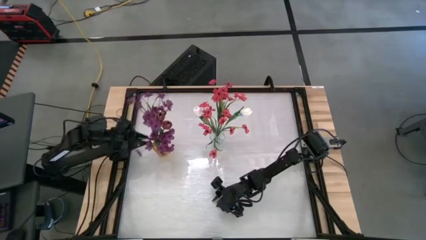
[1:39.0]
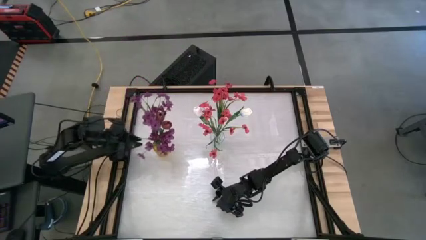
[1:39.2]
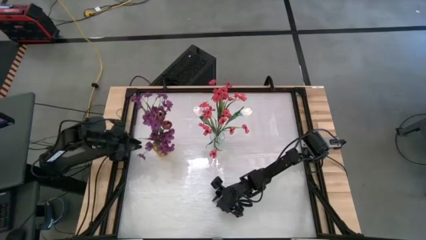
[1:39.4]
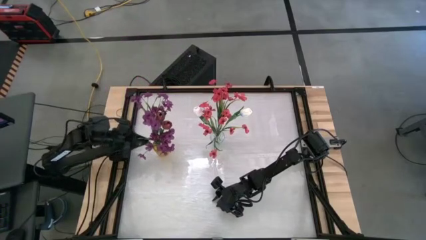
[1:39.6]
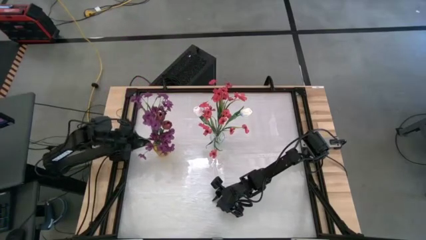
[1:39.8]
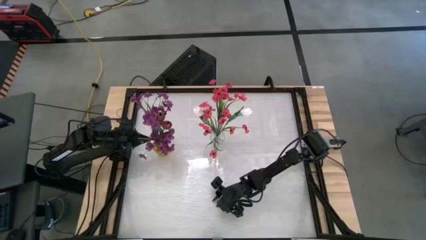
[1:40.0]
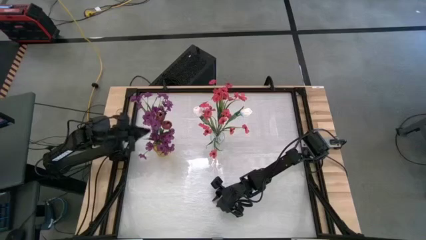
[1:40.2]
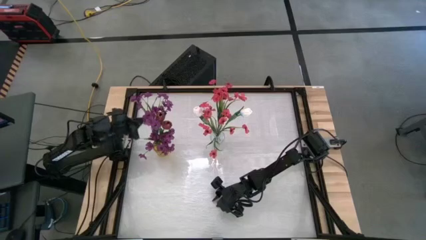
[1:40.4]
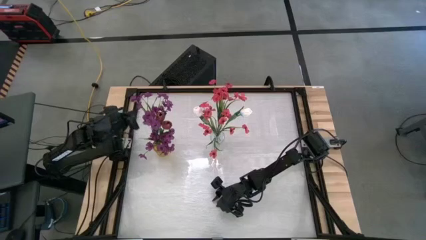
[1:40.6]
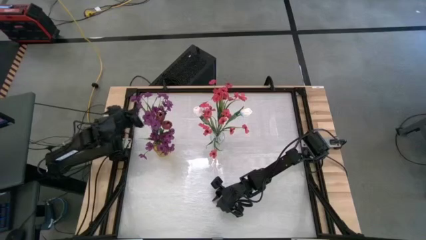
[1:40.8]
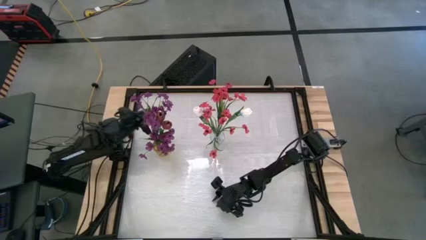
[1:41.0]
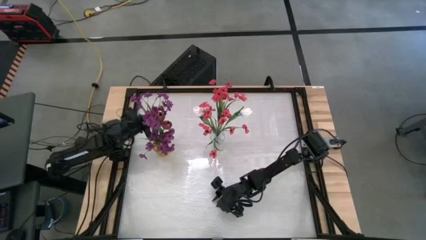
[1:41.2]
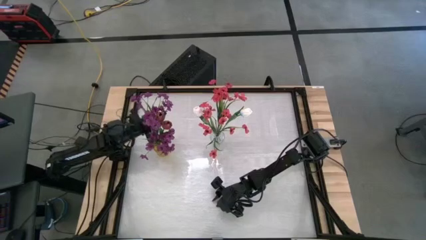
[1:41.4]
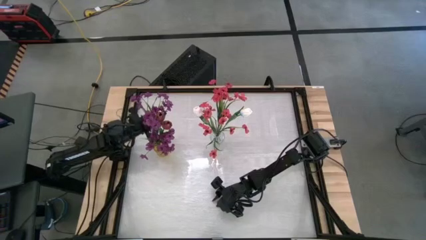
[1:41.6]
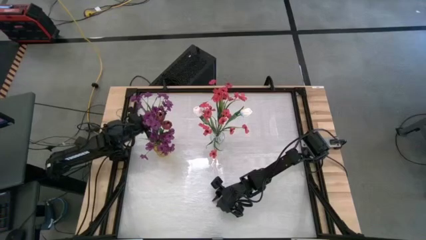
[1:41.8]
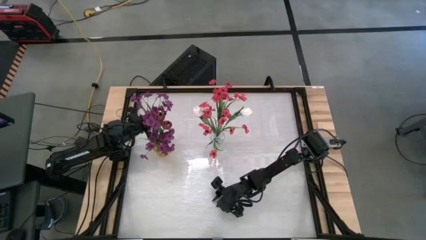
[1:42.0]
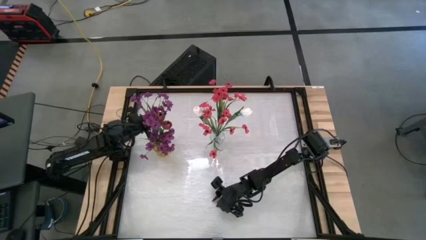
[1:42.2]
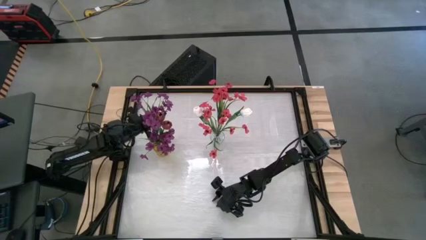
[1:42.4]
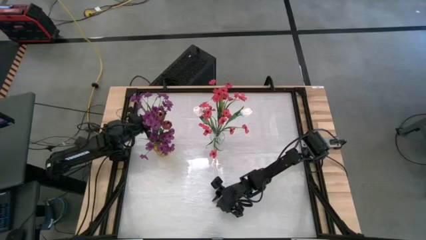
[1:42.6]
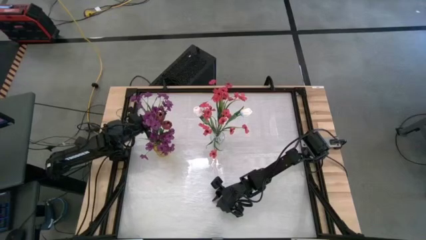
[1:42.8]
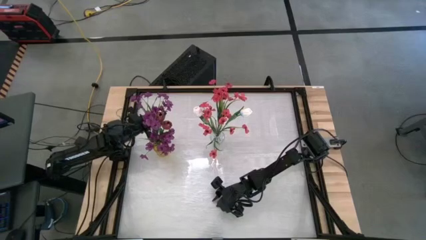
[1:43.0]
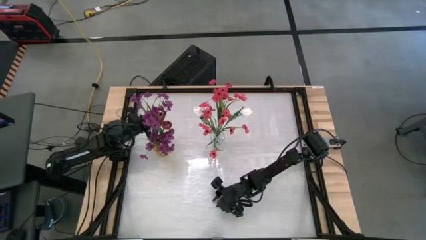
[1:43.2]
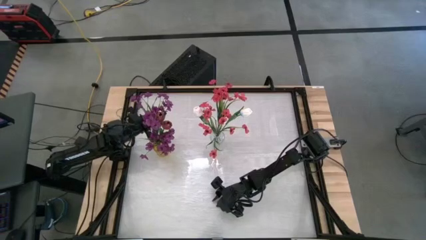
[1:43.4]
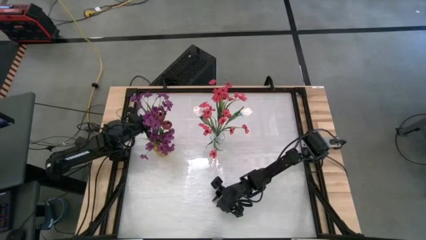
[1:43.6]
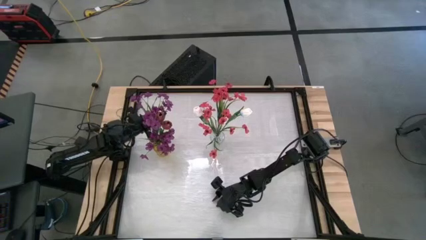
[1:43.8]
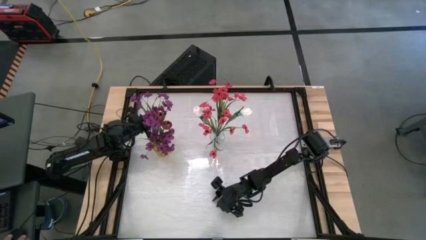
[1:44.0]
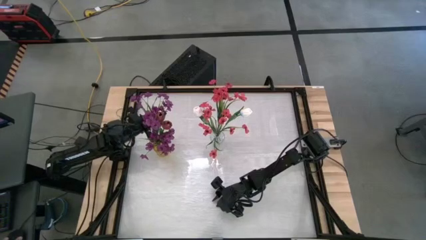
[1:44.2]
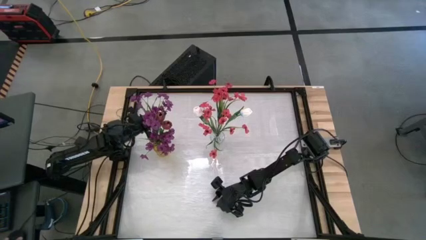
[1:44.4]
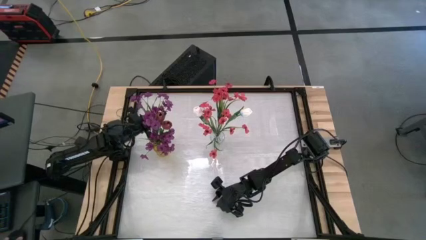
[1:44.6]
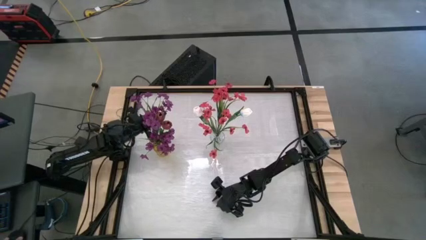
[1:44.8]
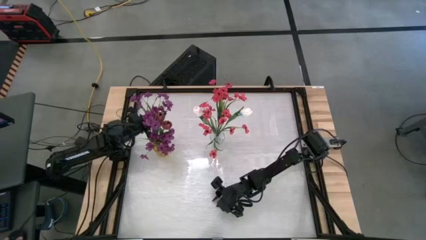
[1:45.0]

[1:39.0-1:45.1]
Task: Sort flowers into vase by color
Return to Home Position

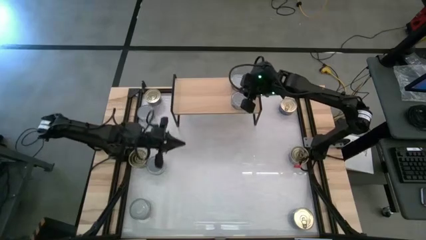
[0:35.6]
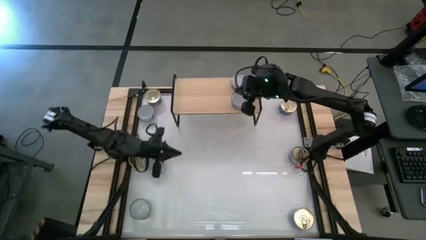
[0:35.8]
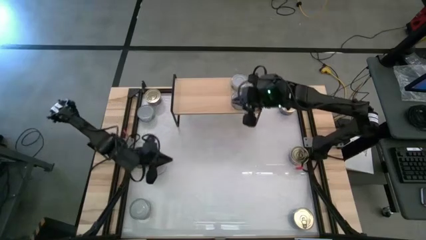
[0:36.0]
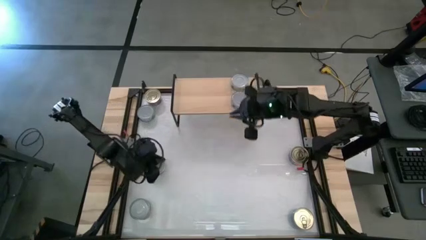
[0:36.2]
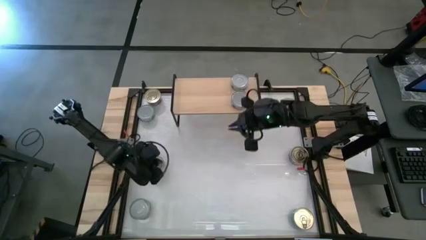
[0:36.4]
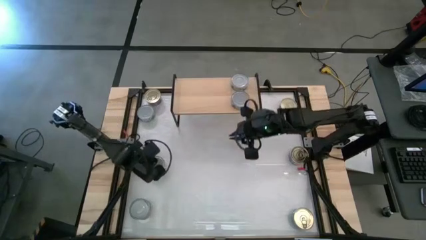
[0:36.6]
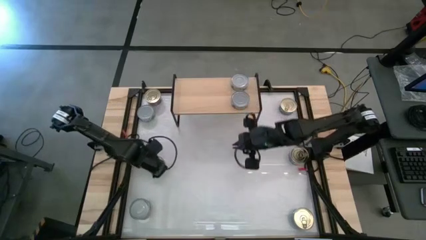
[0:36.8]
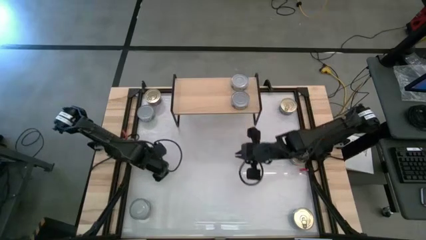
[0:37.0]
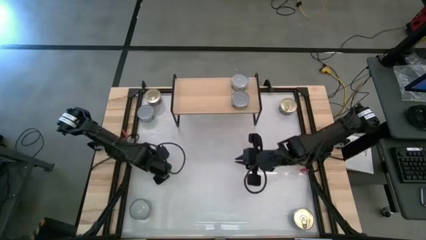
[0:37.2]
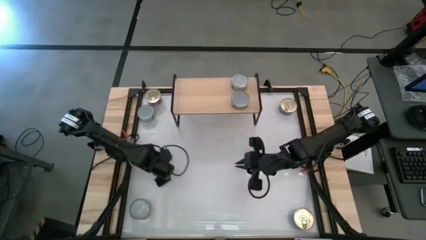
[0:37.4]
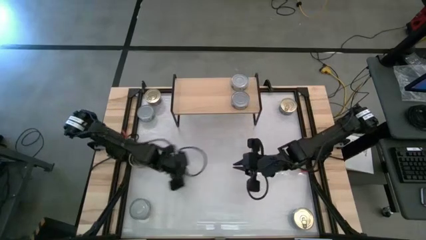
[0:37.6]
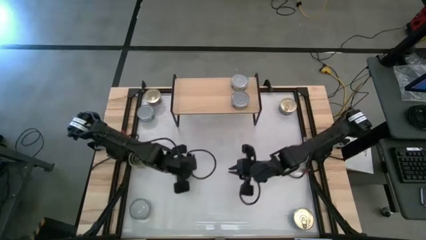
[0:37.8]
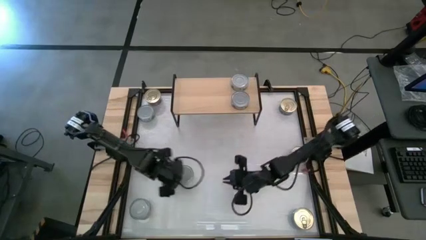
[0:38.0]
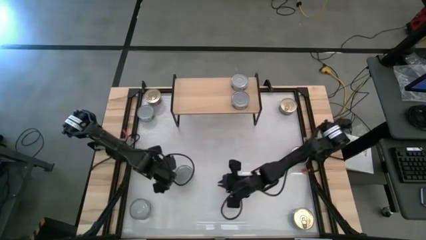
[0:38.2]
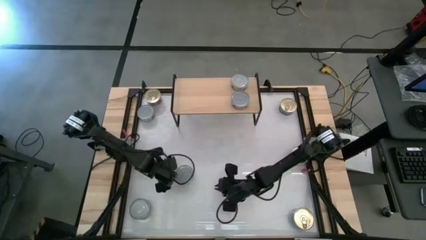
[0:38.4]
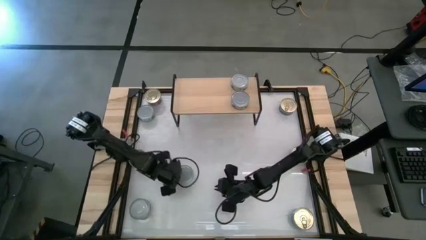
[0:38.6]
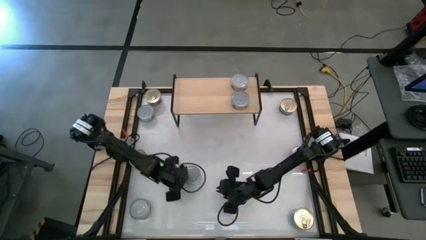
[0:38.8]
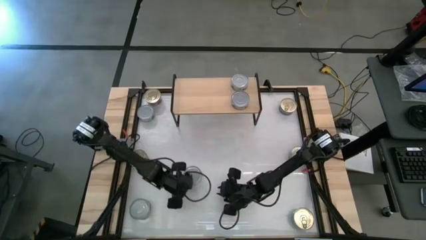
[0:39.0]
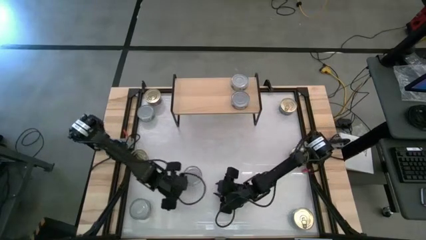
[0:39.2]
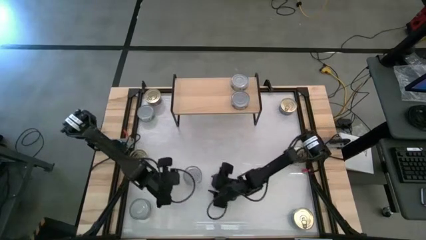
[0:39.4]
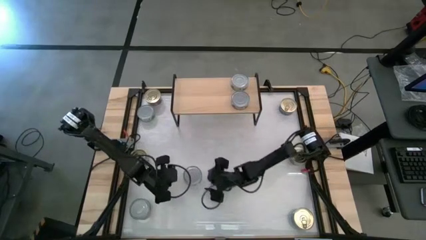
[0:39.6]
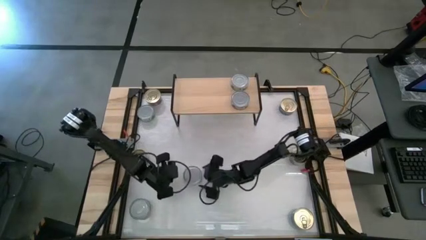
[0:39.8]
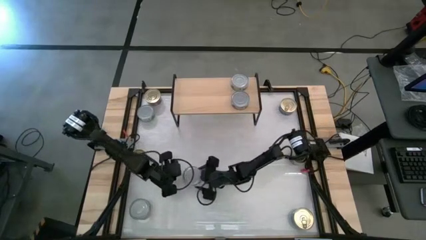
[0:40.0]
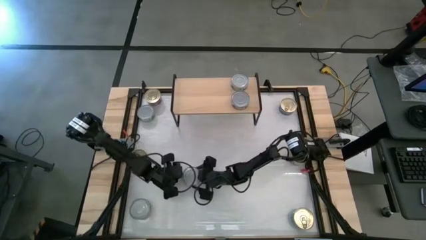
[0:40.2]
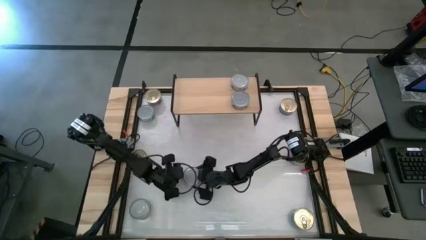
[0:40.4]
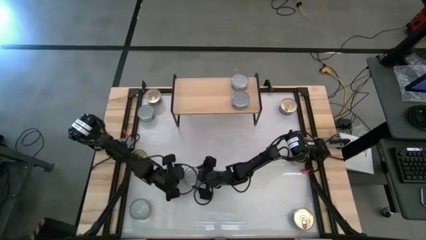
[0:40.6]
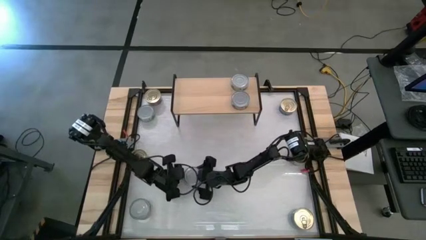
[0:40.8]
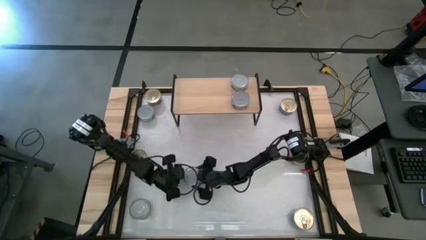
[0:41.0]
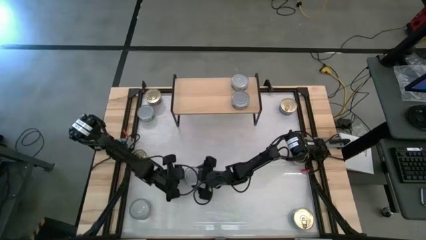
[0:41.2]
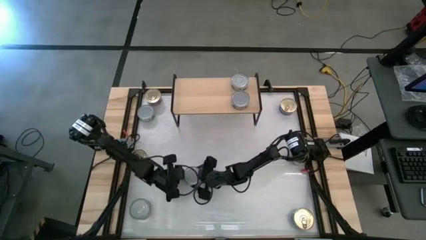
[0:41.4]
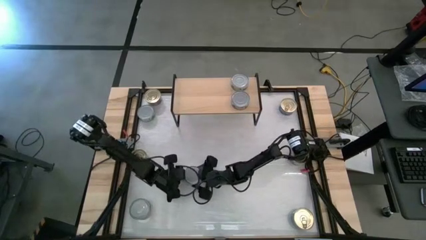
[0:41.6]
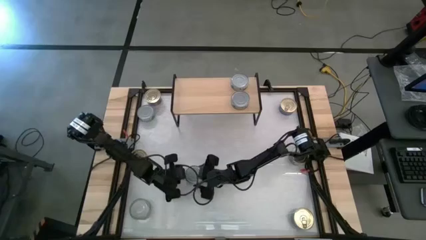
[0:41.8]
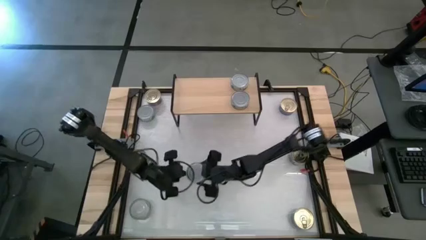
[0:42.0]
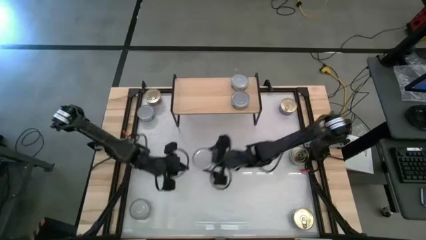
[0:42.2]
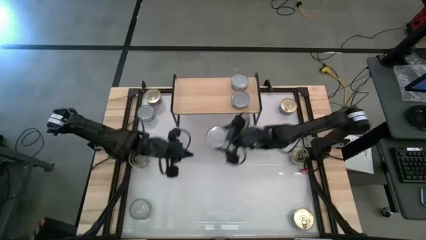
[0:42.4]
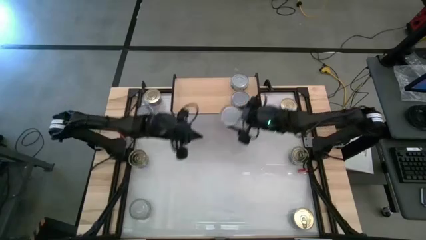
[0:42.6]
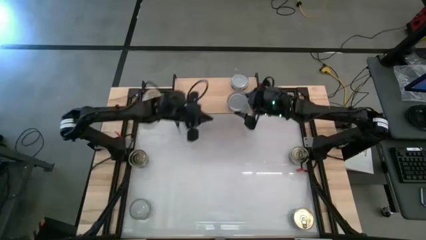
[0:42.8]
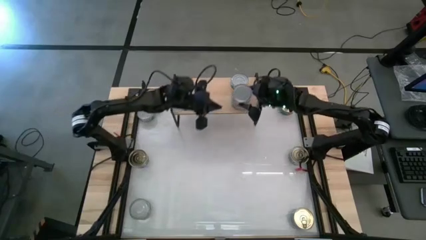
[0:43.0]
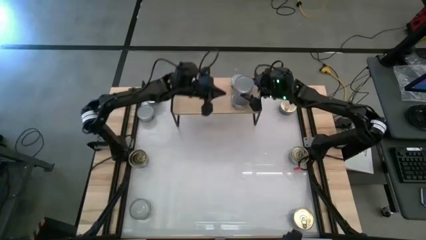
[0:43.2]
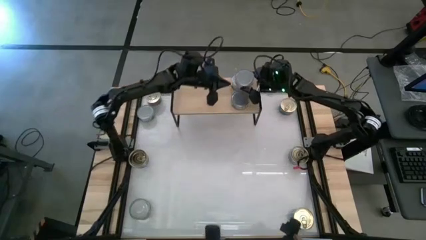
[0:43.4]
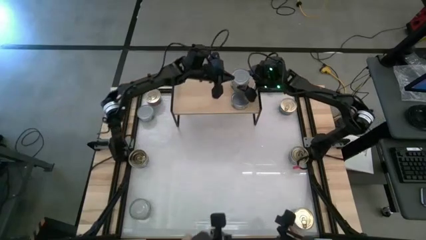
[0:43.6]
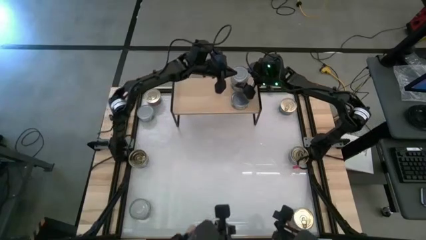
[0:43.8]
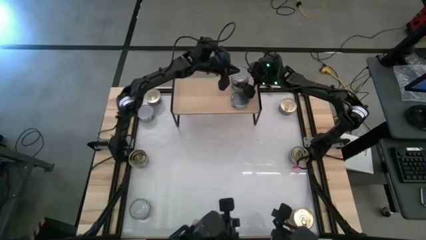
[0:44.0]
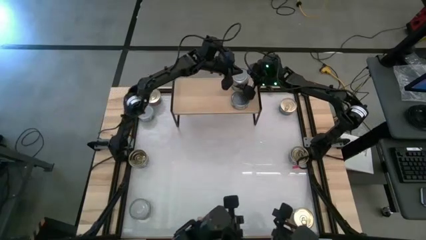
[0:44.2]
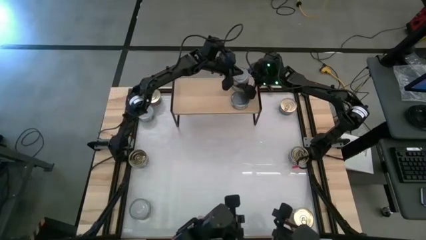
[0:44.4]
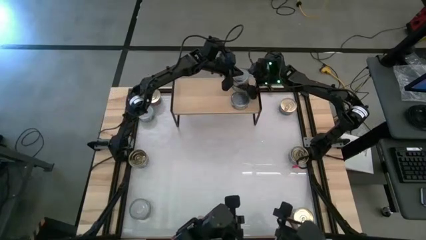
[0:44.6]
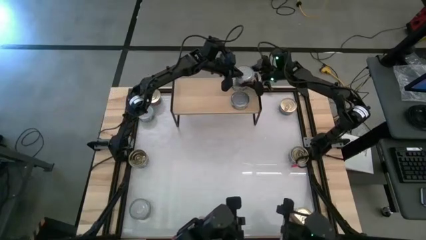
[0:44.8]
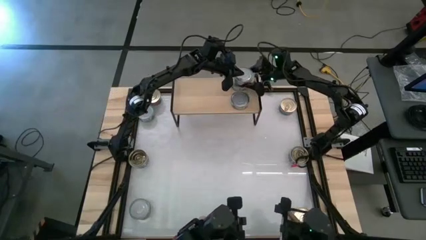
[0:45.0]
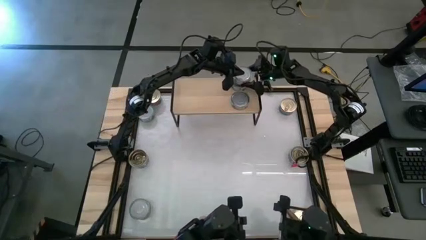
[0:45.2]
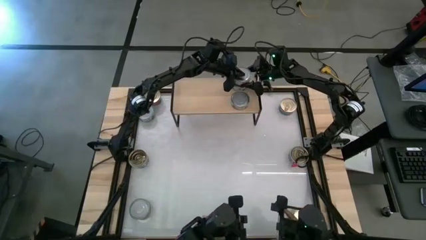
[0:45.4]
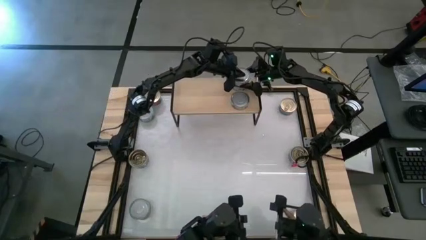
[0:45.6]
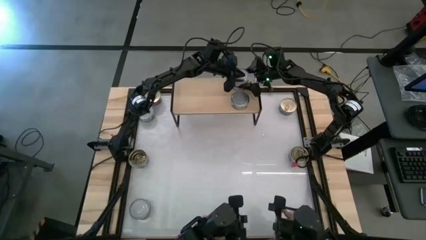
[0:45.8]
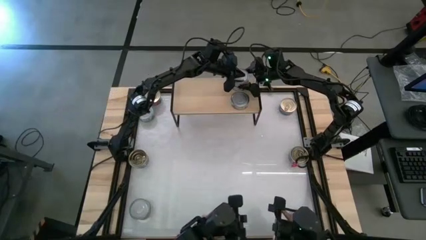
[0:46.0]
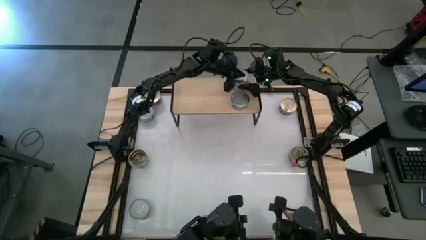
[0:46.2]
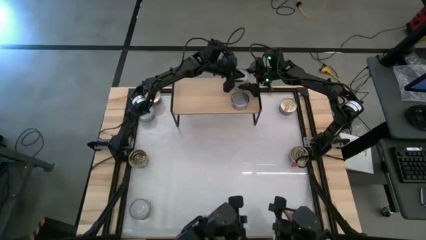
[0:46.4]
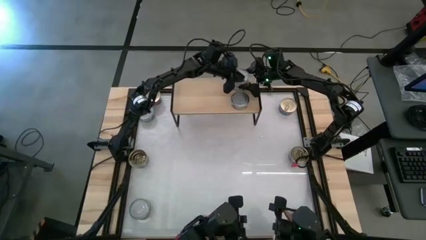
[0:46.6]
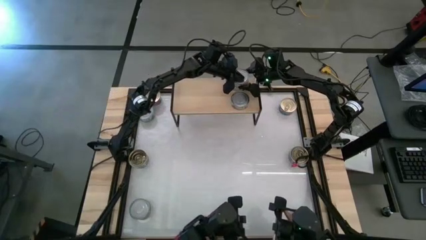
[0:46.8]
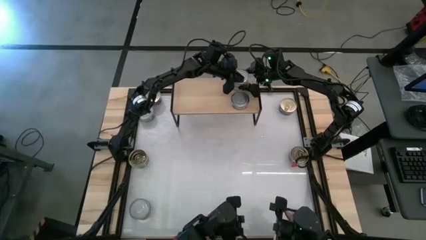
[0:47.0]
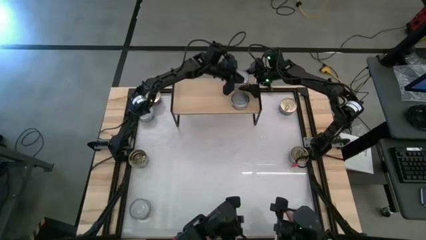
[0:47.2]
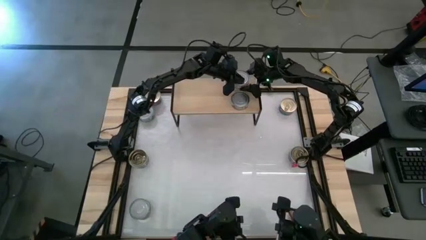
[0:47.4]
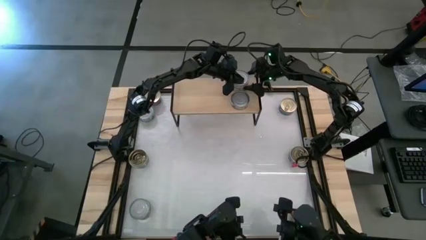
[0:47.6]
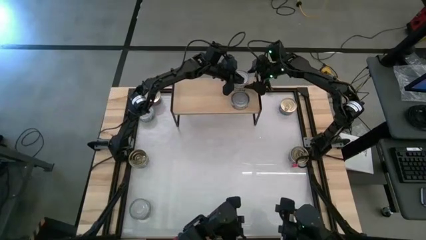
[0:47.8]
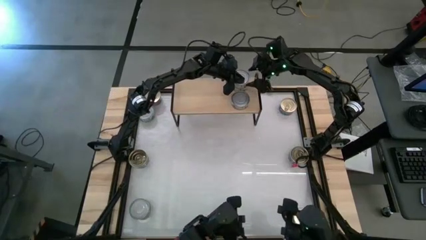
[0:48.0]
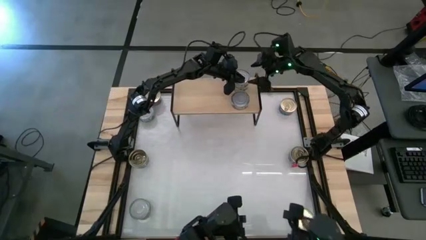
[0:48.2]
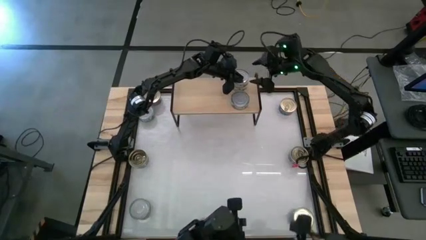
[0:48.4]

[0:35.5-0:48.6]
Task: Stack canned seafood by type on shelf
Stack the middle green tuna can on top of the green tuna can on the shelf
